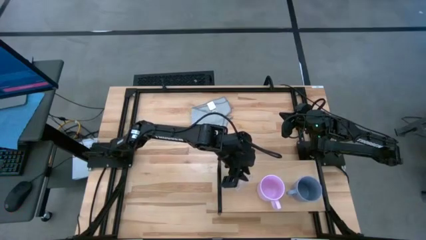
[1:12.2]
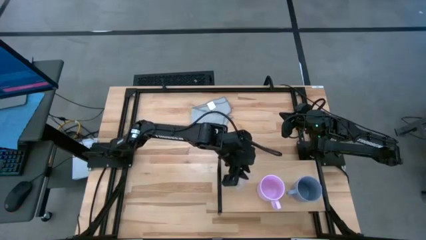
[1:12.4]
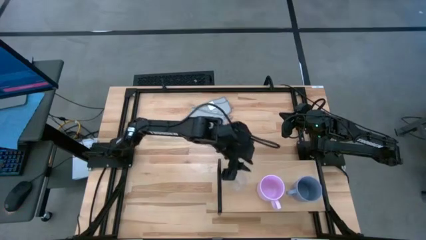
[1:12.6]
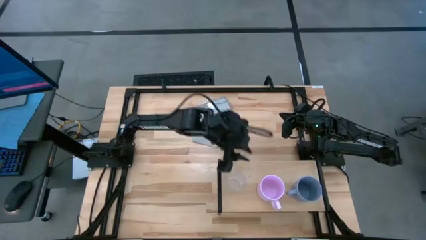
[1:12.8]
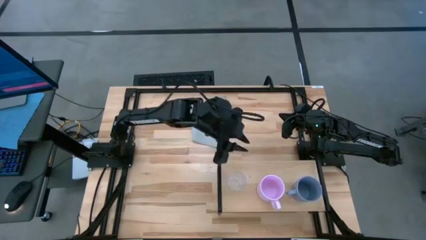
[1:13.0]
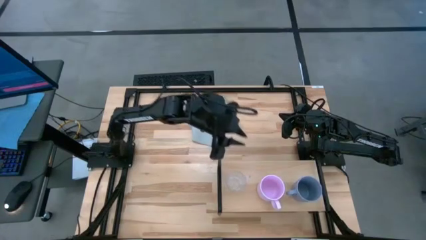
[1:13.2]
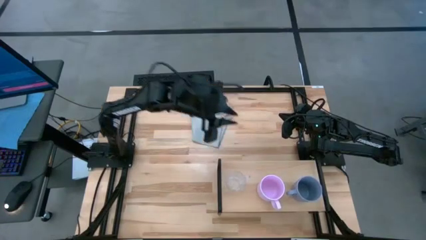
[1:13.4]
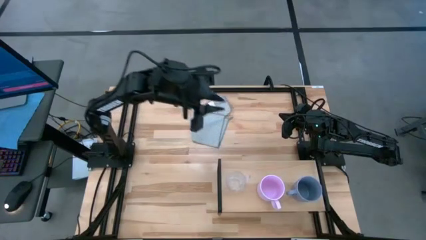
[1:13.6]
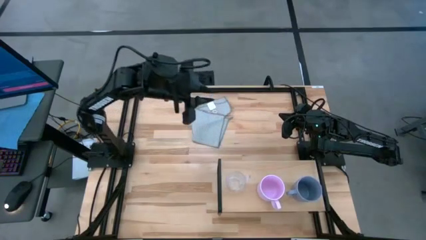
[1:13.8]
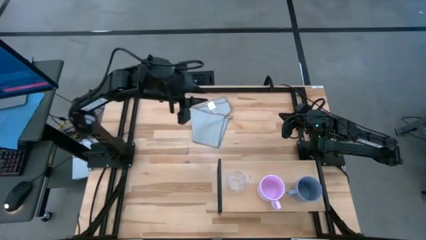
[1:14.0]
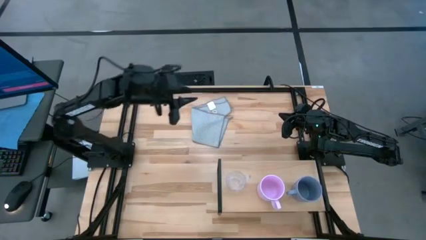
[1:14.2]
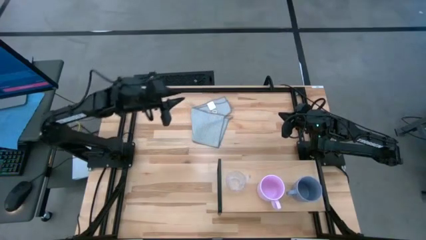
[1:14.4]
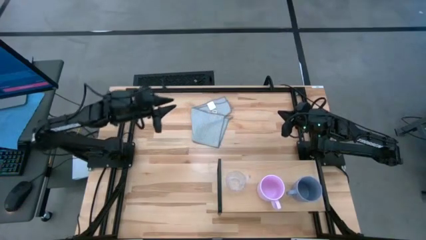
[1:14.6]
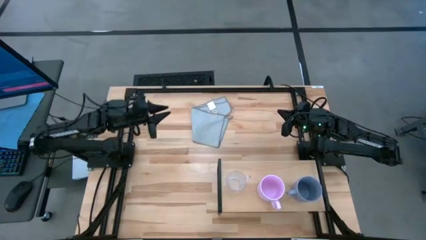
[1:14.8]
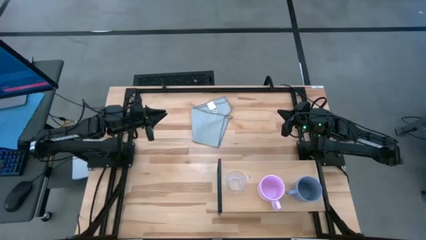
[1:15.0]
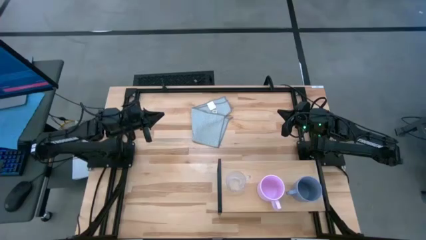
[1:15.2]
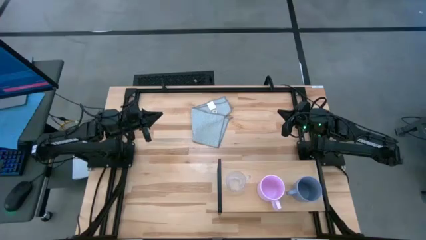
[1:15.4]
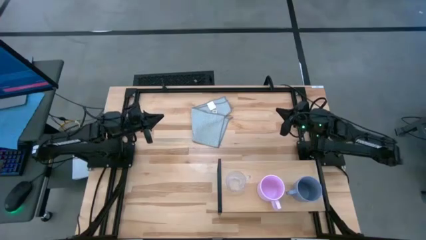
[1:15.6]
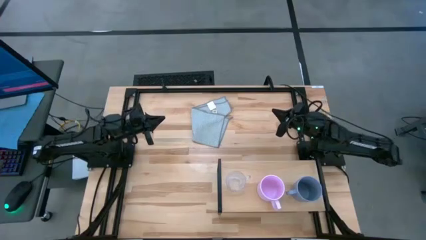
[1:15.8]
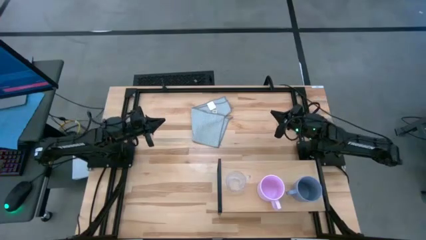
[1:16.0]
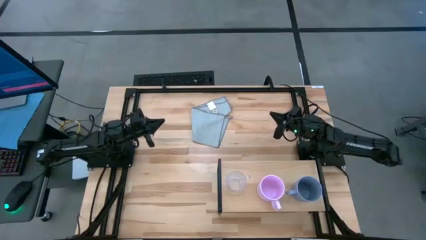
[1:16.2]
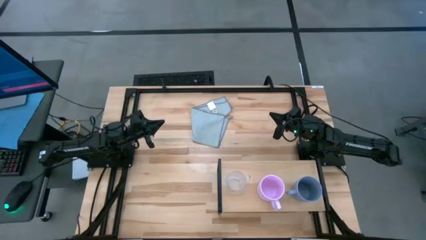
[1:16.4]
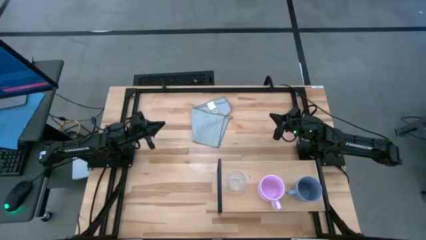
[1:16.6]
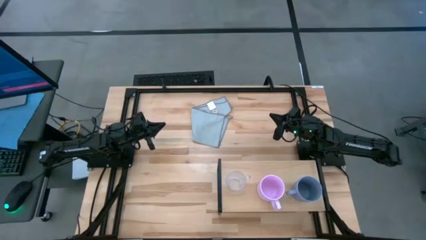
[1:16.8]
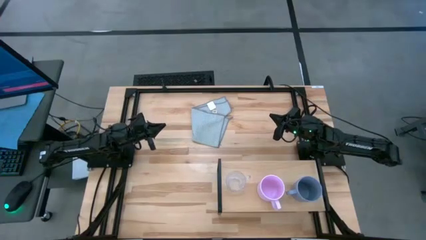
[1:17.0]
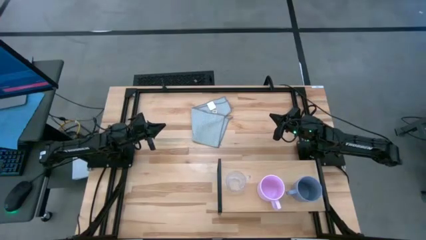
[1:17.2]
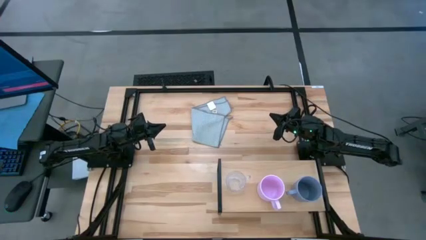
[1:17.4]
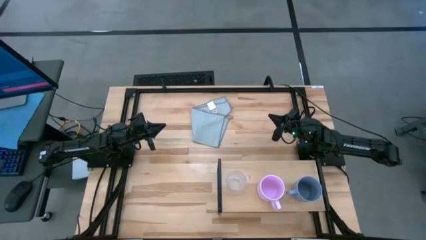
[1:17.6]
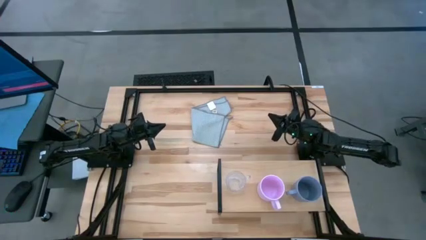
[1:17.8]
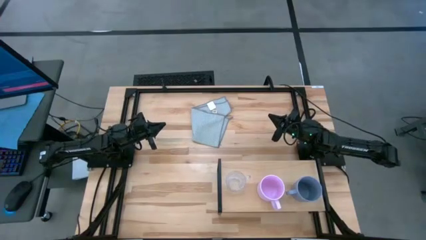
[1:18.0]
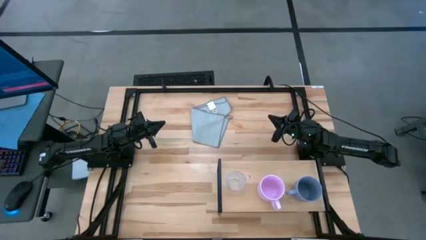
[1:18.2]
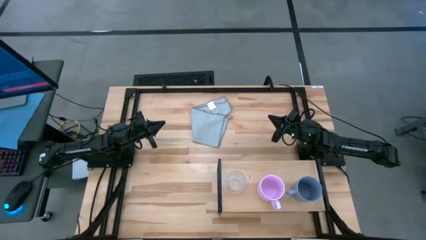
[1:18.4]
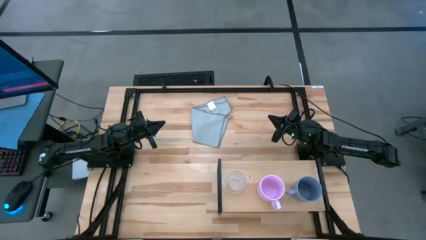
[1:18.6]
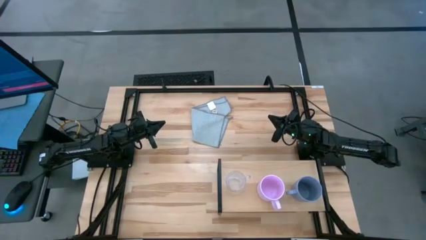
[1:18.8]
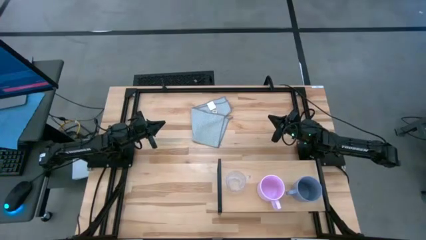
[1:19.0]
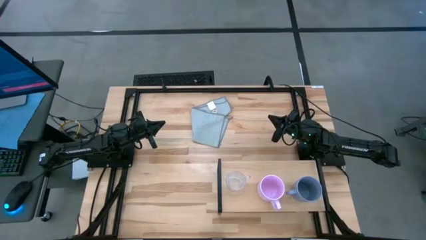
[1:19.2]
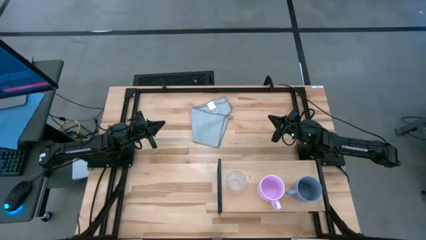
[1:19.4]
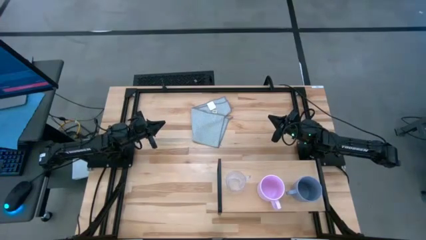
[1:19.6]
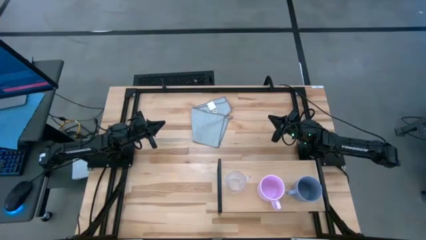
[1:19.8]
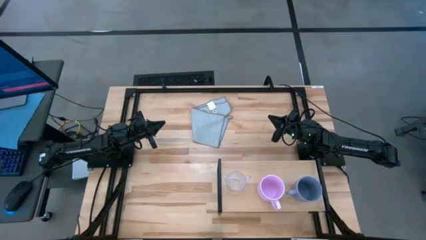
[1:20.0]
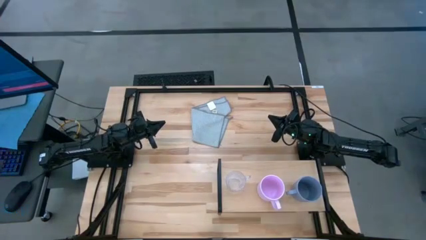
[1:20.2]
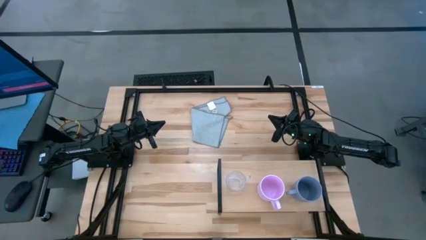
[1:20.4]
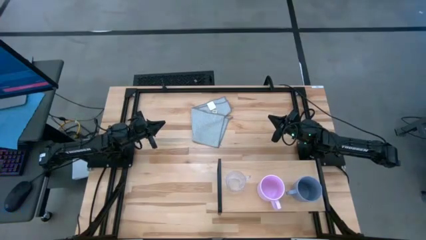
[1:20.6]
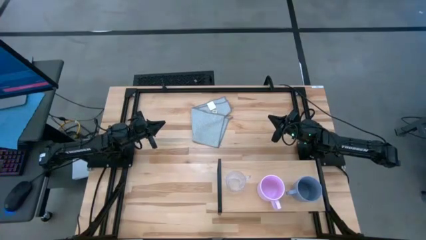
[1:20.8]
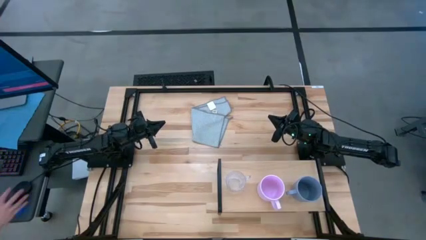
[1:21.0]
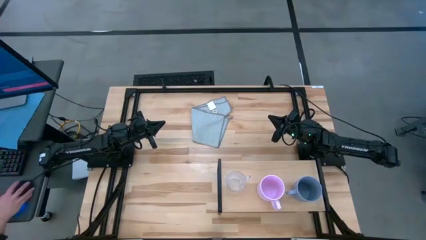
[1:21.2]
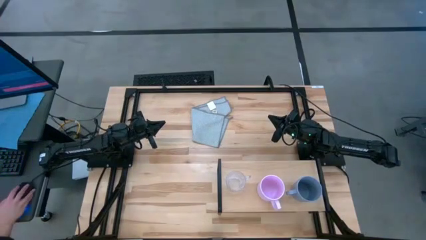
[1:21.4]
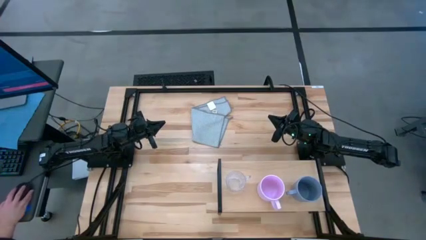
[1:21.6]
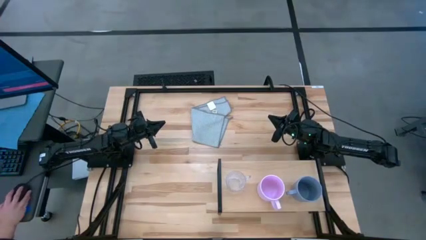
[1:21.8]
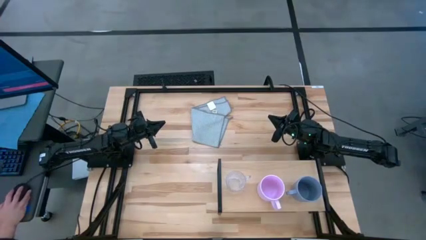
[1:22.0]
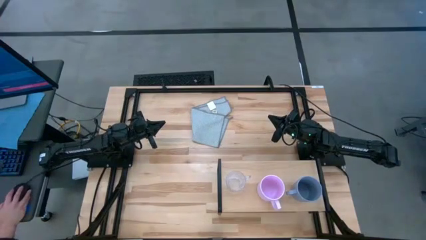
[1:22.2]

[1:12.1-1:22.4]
Task: Stack small to large cups/mugs on shelf
Return to Home Position

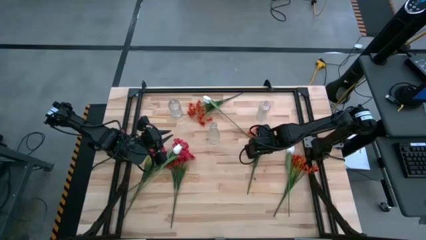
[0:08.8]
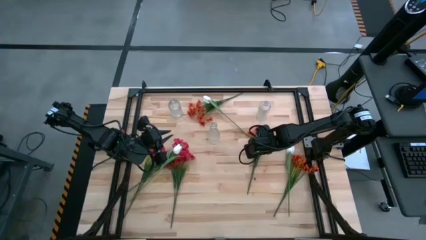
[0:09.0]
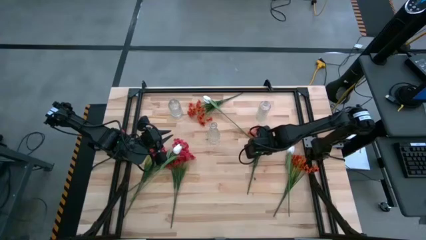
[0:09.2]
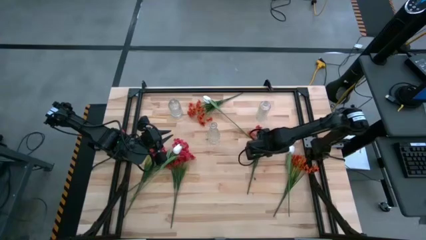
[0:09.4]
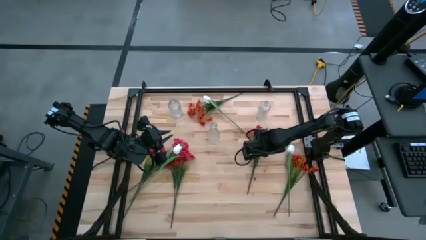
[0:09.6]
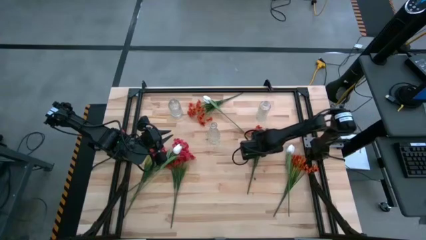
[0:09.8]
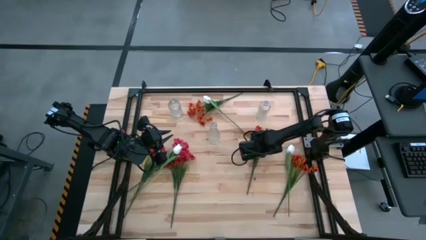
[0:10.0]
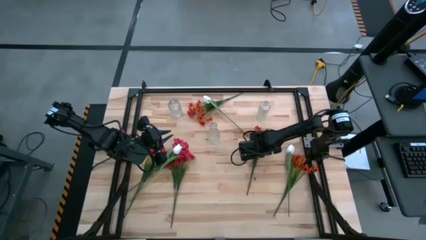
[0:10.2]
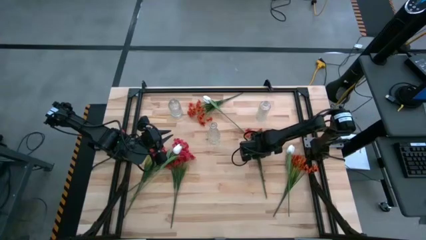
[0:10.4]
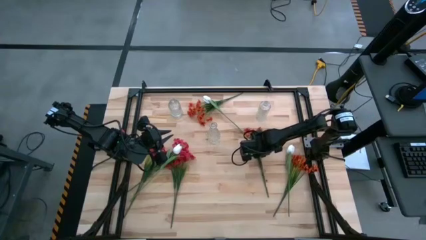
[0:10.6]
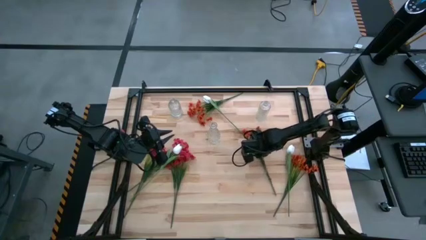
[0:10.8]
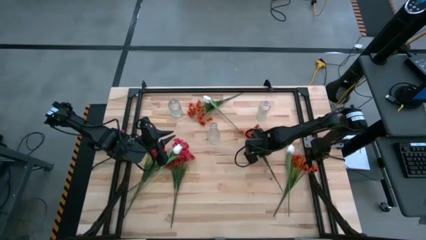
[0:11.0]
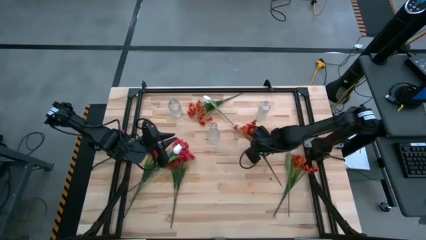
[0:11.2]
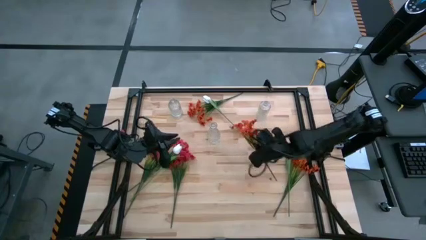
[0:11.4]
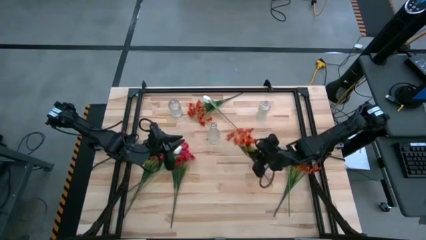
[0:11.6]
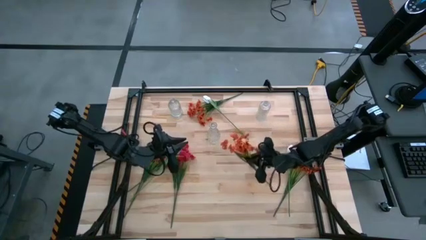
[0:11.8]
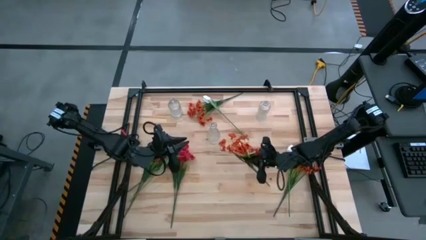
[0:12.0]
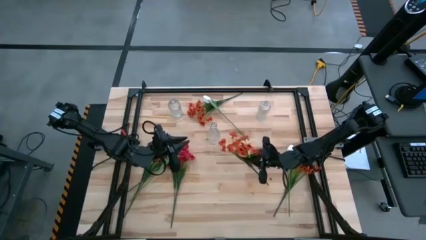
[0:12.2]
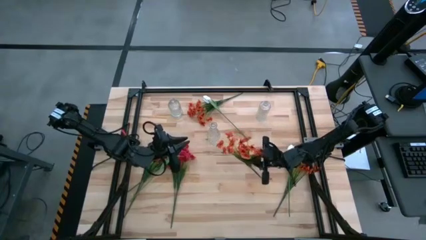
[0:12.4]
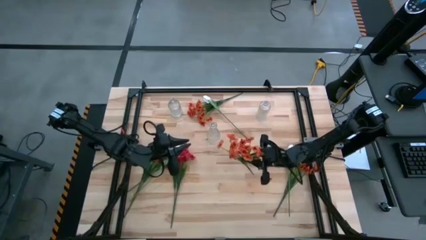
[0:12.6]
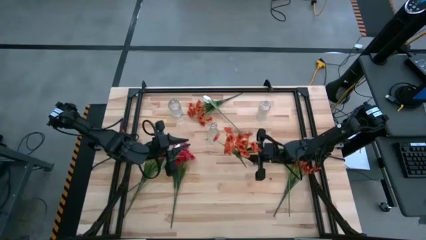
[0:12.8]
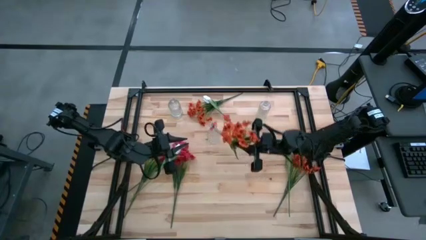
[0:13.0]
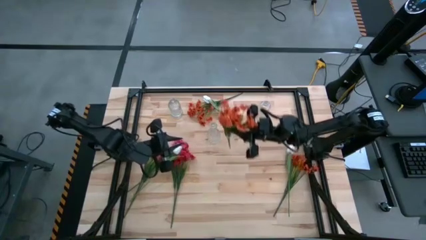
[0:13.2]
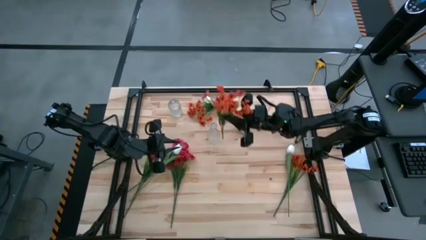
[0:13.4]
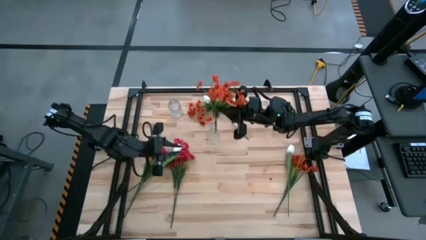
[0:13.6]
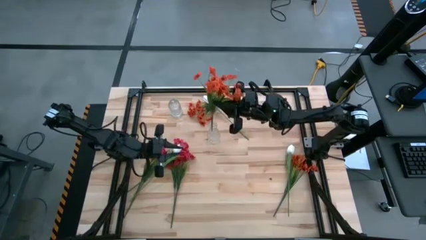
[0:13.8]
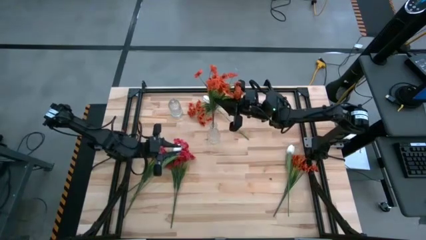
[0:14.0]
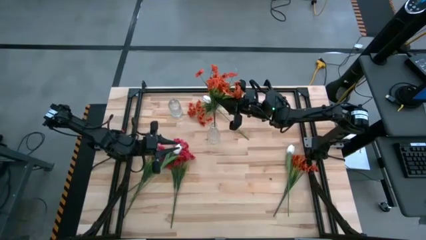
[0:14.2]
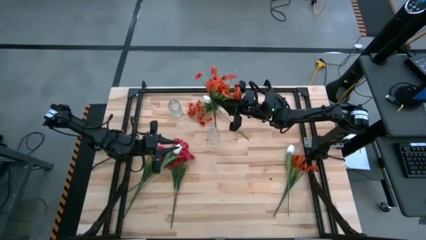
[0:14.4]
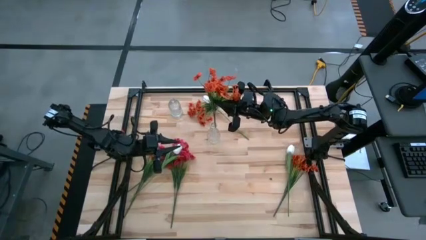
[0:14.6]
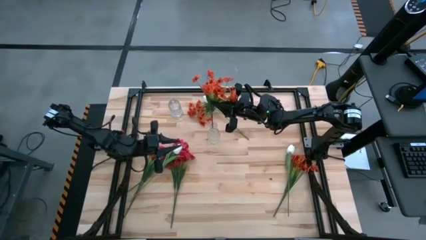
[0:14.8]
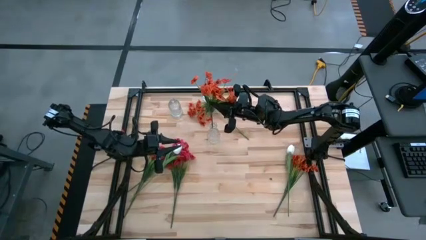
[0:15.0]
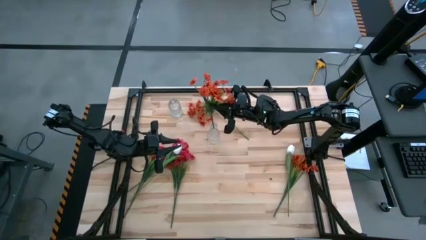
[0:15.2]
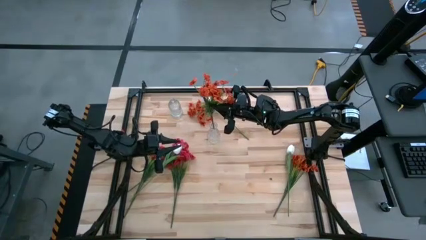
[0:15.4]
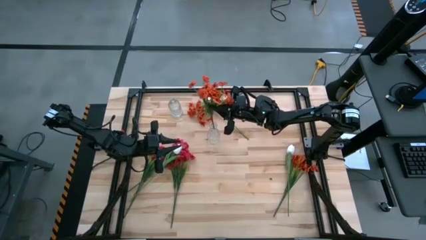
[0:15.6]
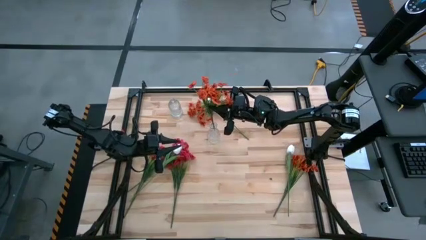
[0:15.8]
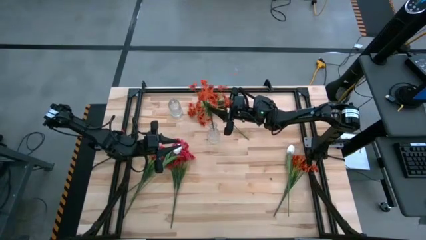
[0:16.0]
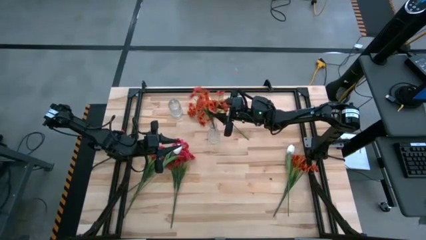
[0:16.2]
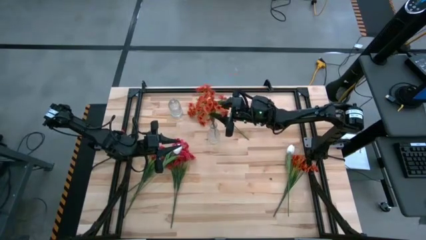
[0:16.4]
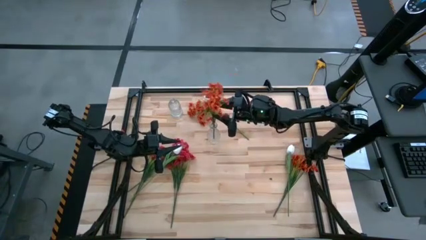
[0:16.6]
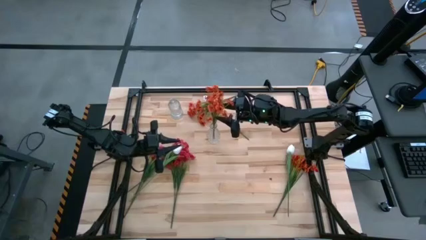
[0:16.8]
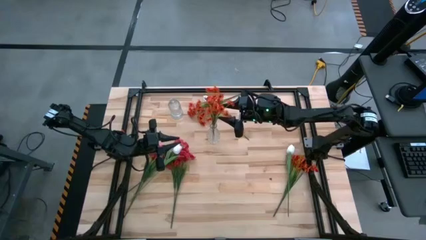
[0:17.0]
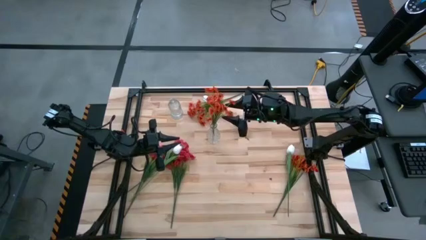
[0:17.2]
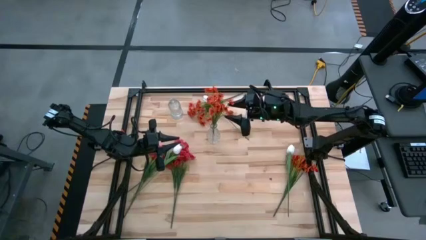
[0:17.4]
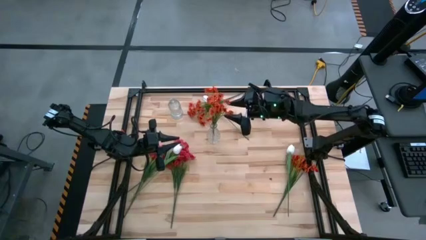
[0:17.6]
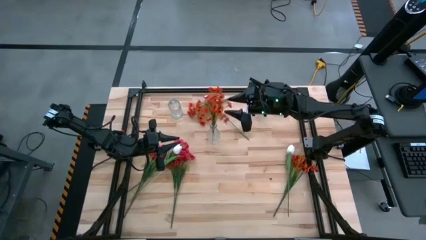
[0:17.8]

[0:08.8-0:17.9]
Task: Sort flowers into vase by color
Put the middle orange flowers into the bottom transparent vase
